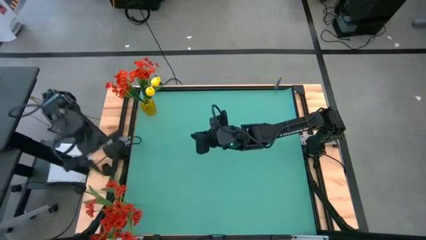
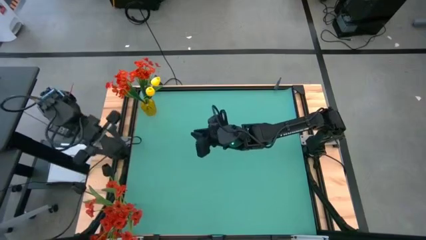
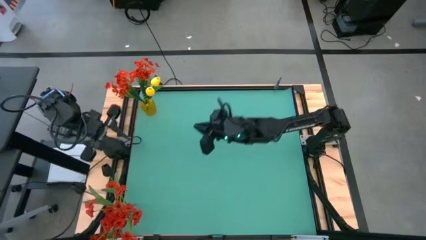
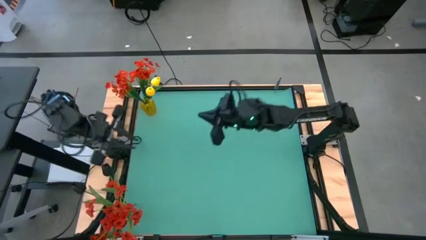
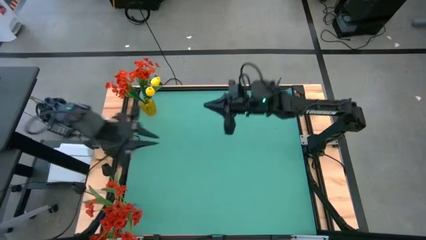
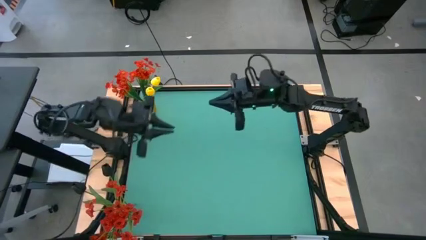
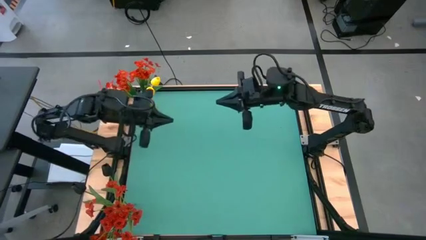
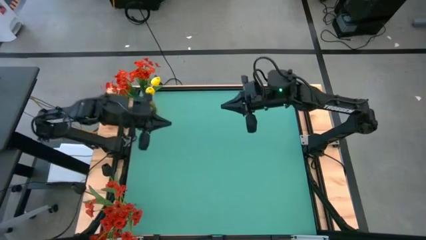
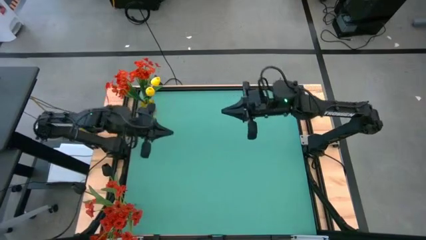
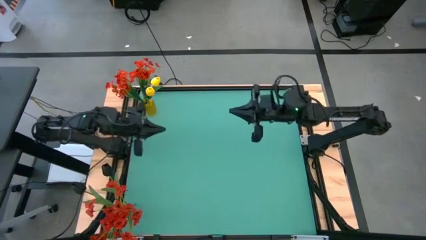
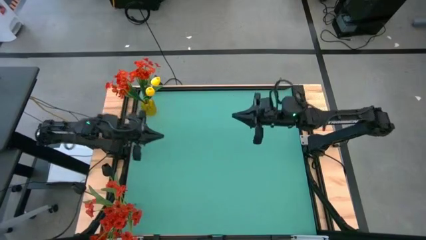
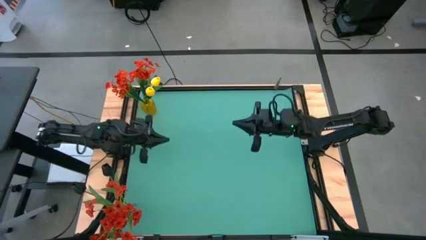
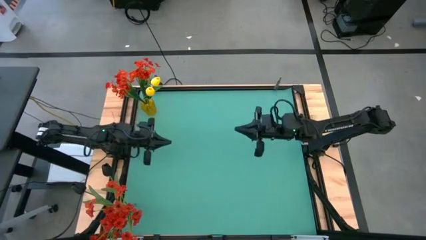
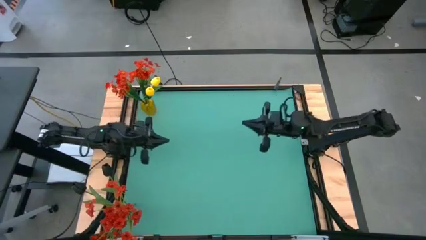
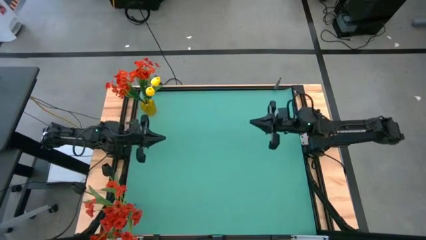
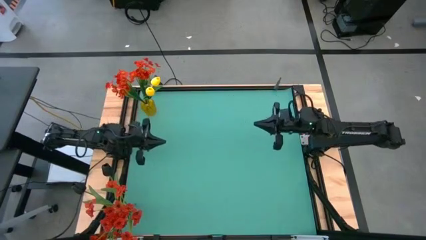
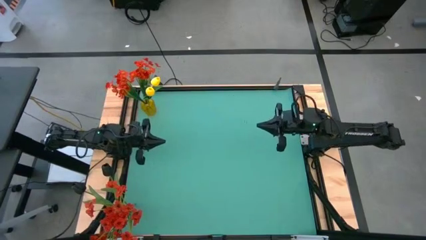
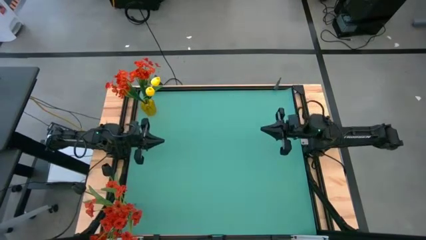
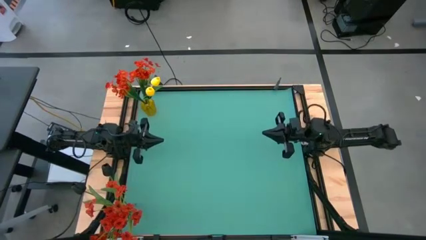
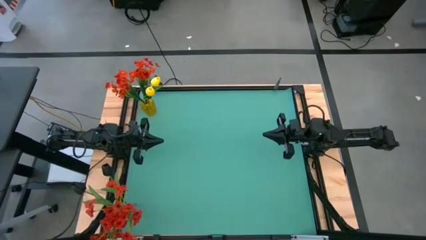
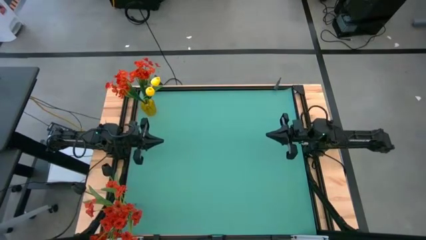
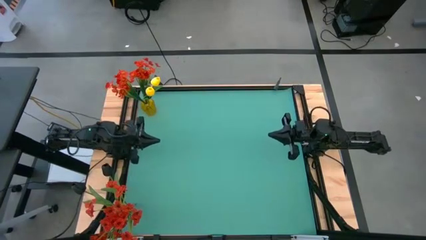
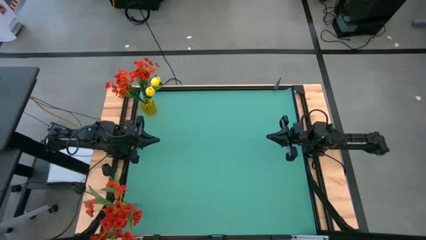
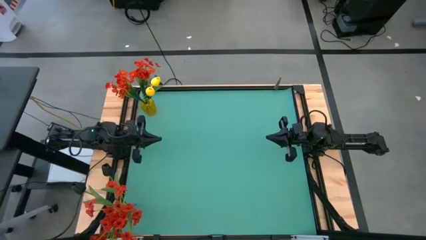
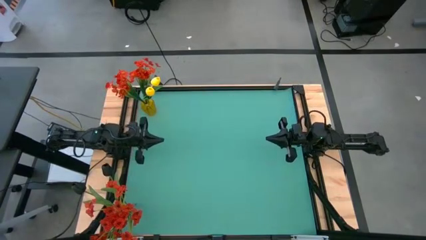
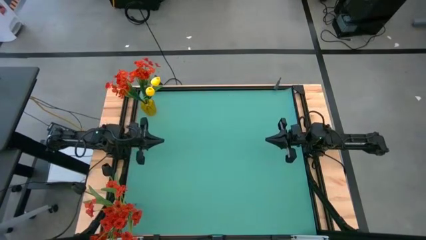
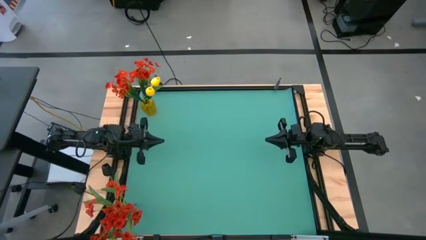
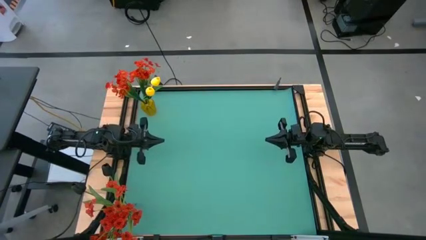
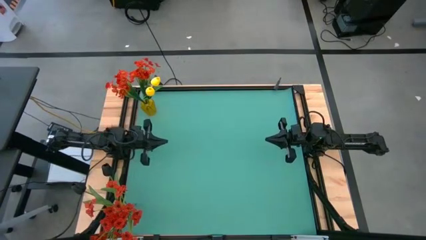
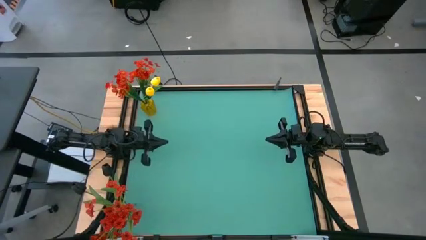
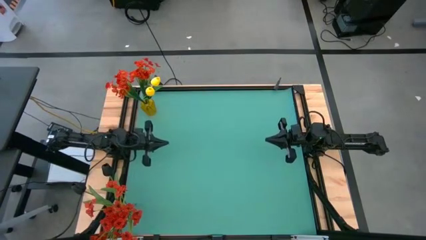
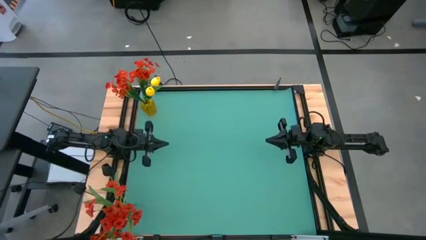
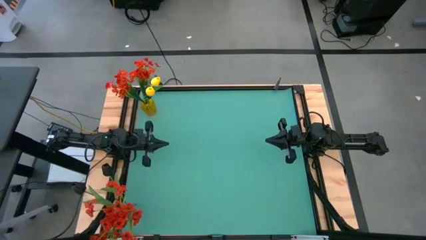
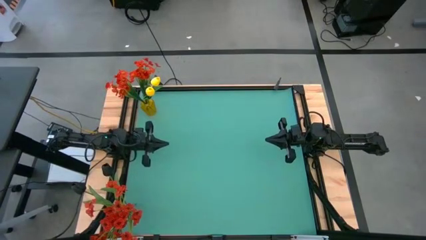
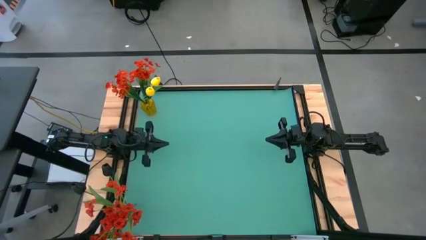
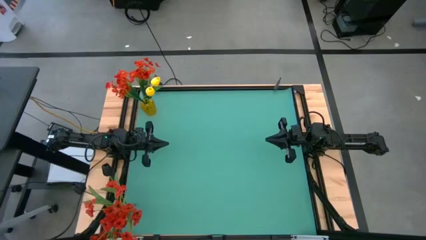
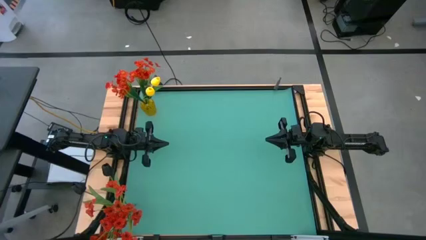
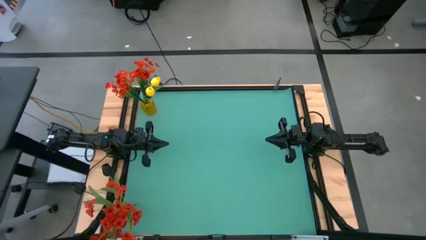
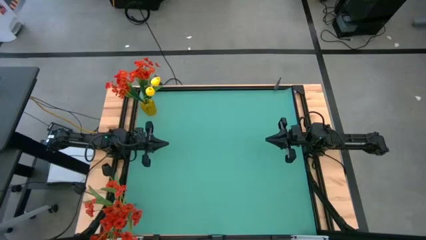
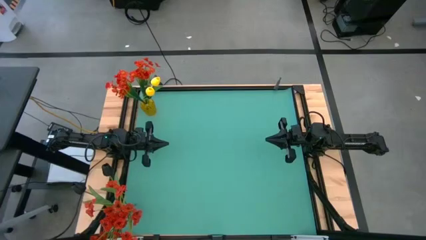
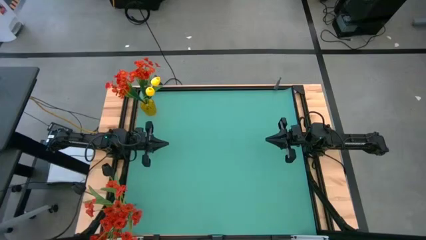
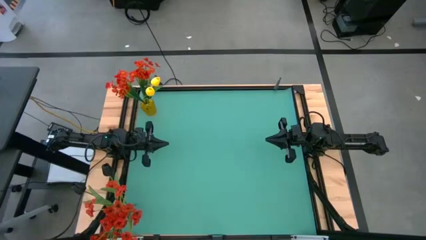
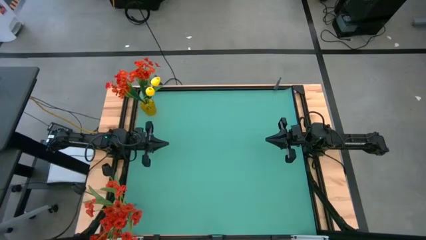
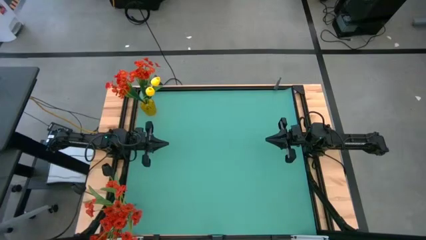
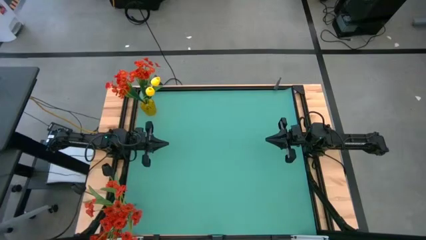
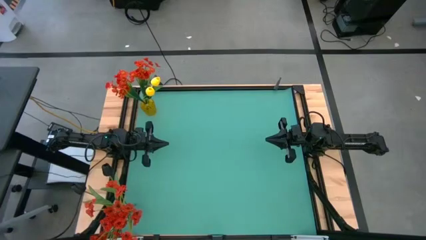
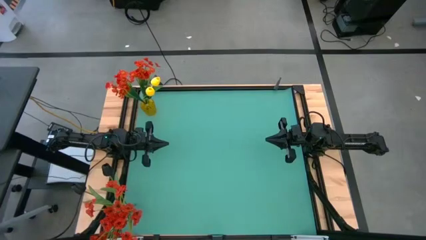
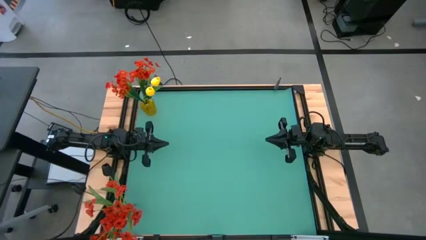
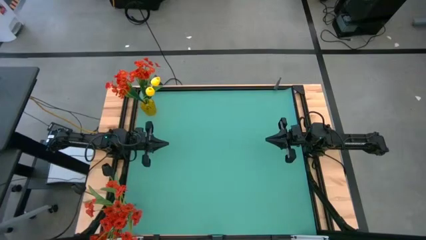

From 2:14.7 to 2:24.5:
Task: Sort flowers into vase by color
Return to Home Position

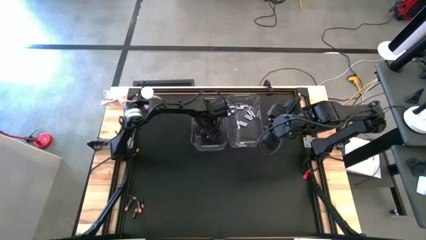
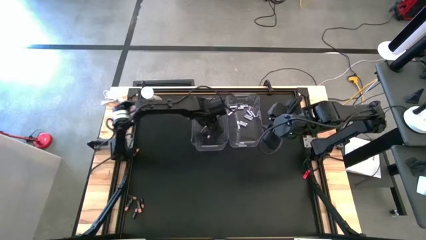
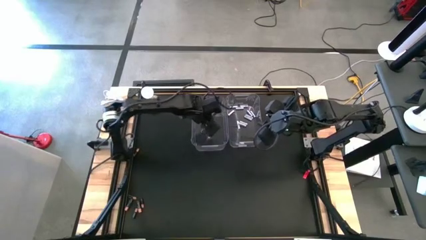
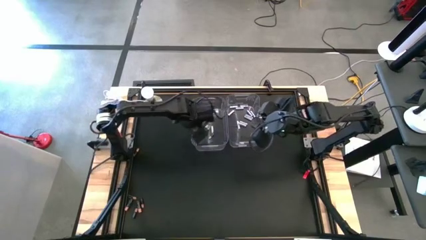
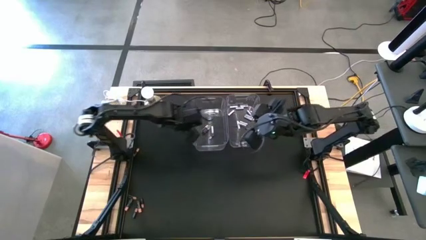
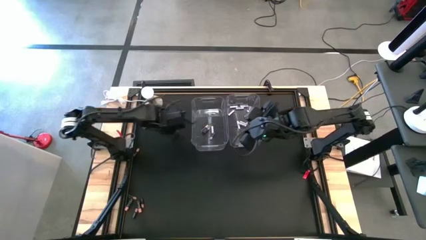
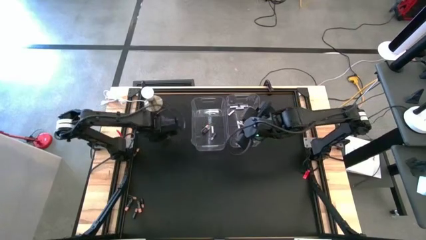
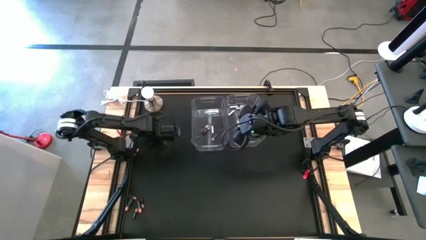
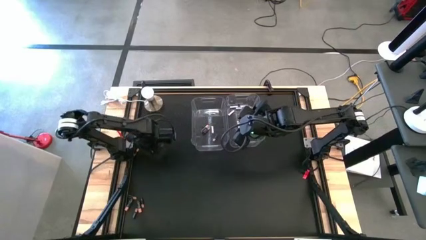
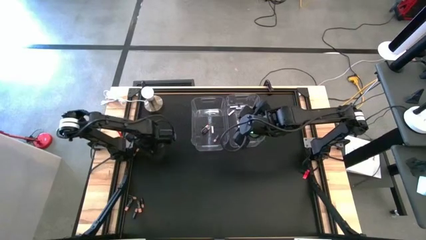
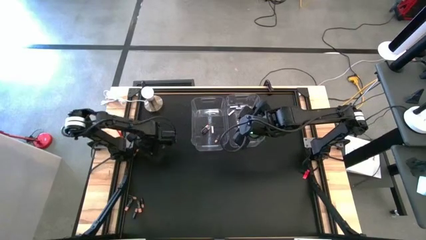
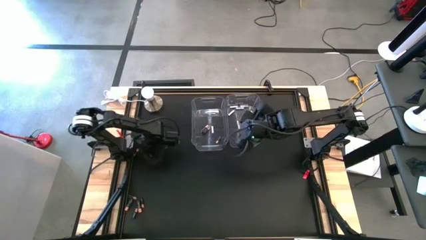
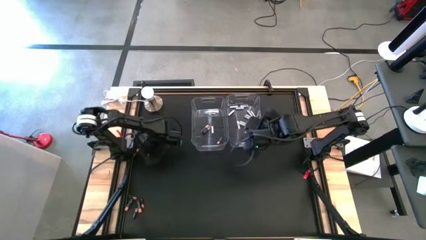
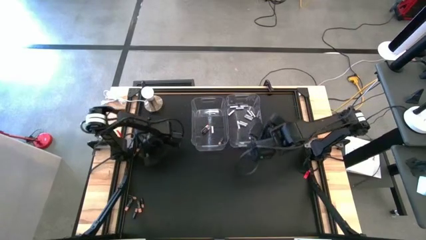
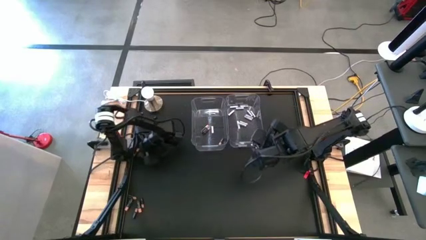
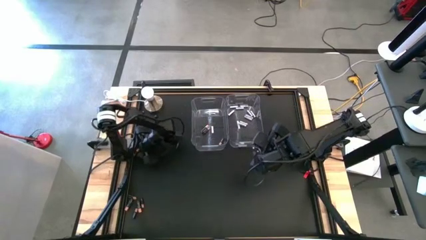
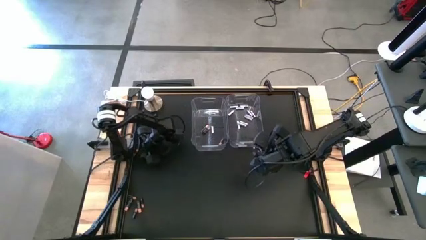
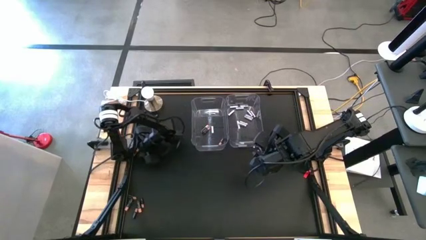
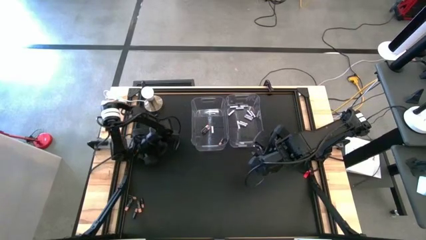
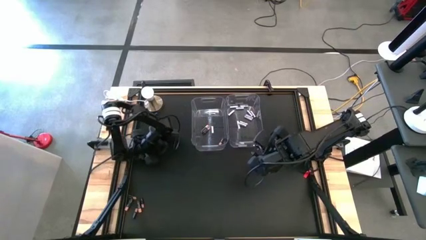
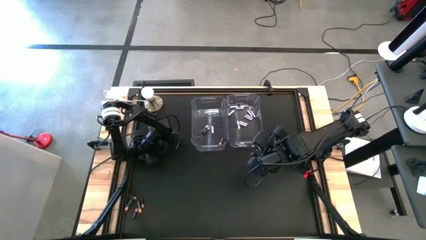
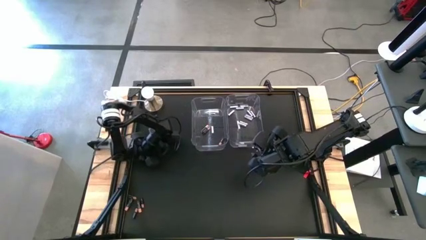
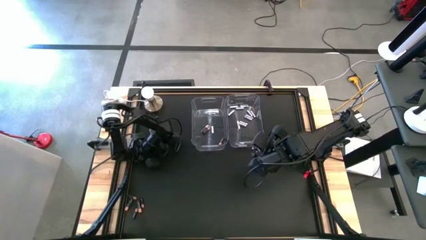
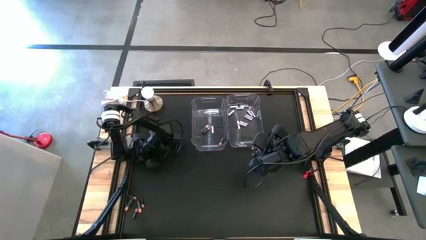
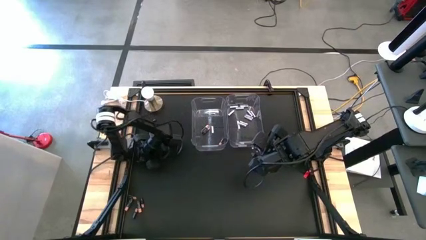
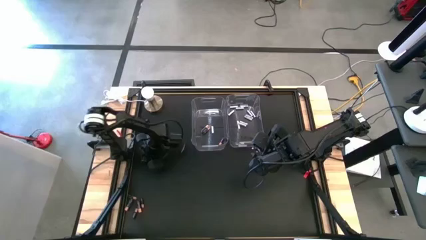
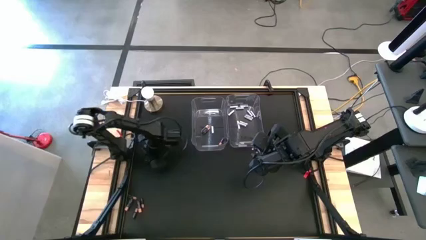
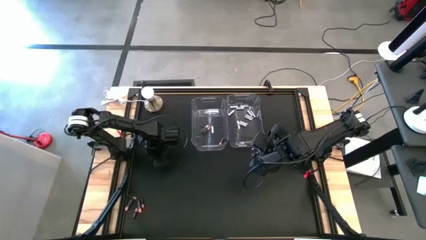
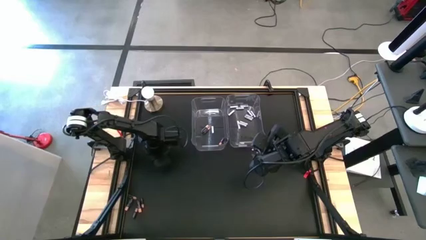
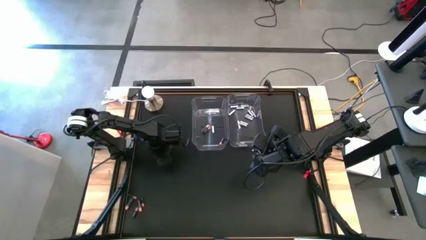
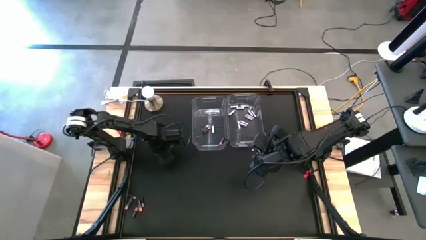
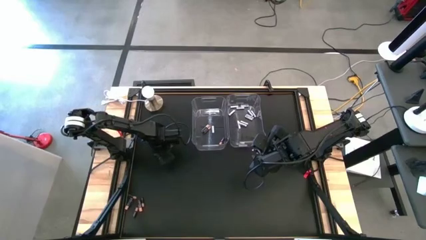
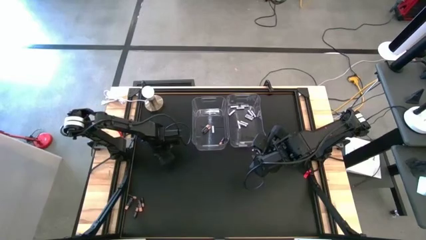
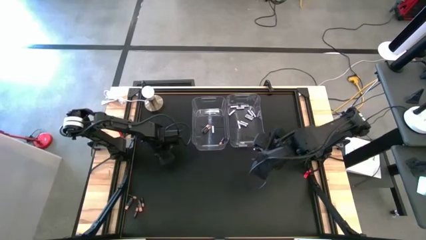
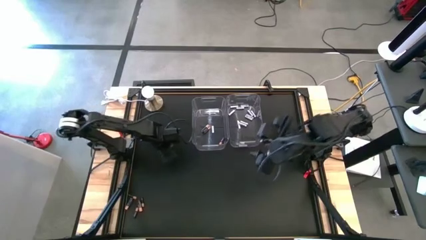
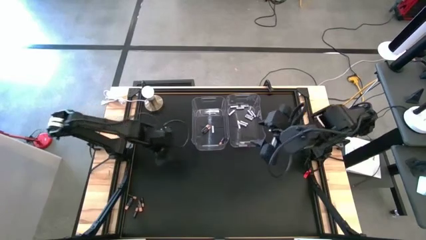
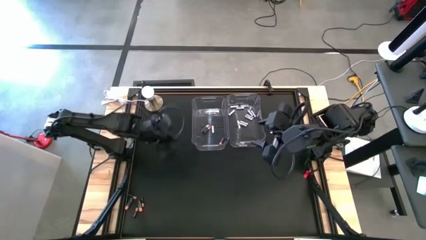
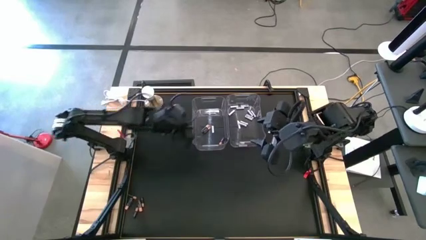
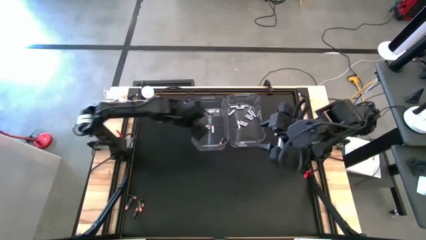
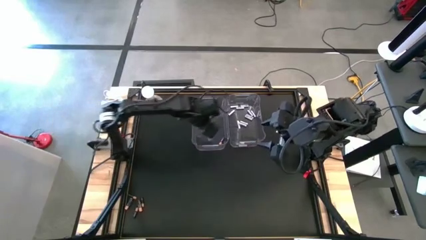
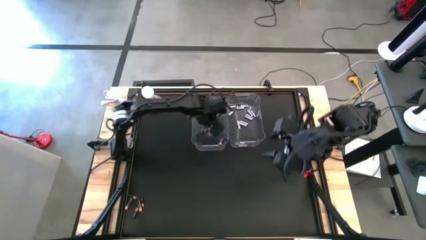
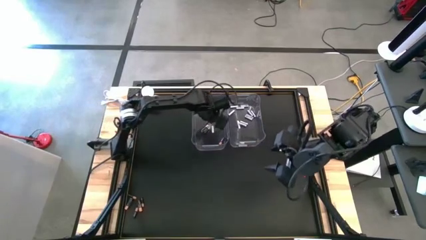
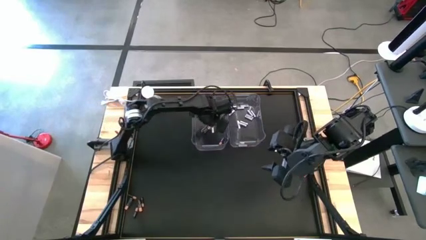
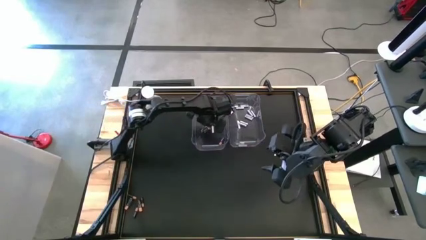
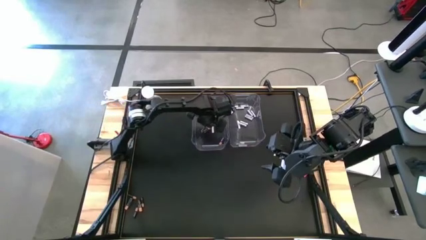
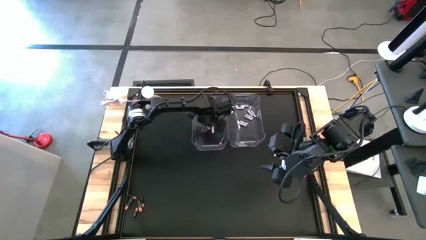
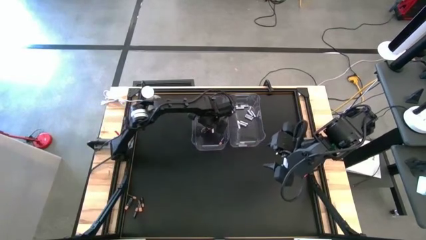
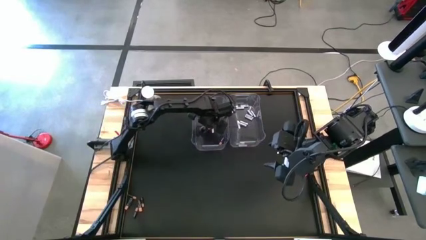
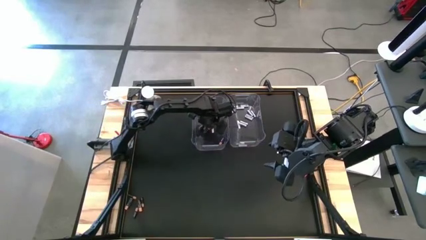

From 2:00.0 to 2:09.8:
Task: Sort batteries
Put the black battery into the left transparent bin
